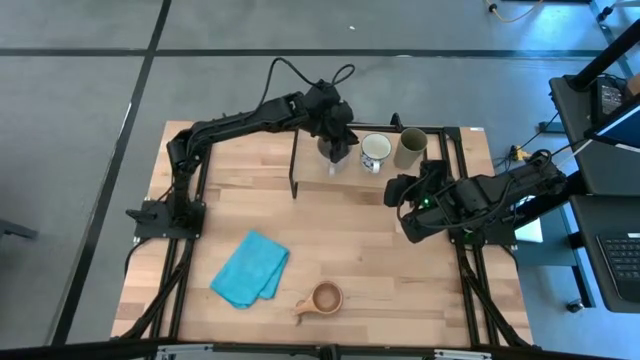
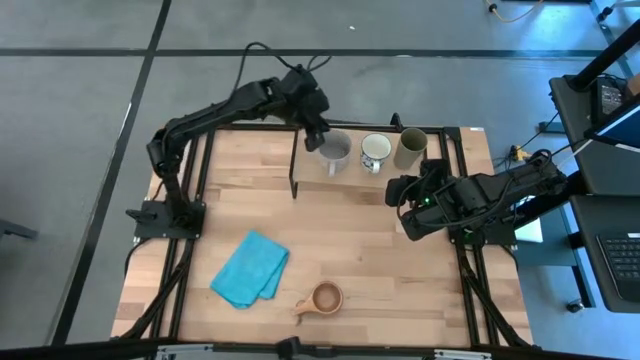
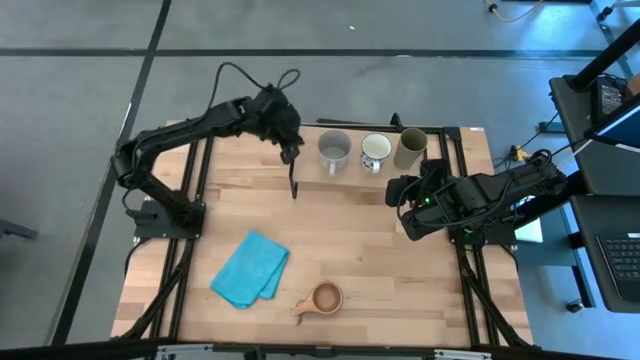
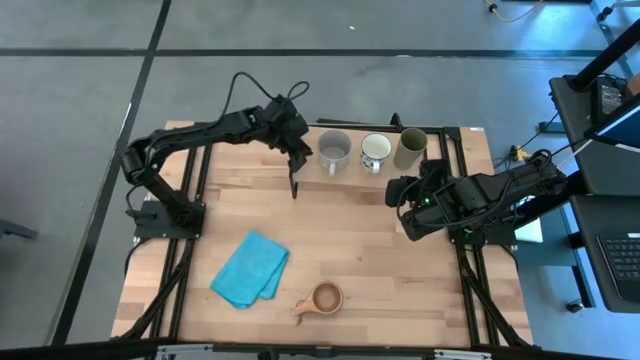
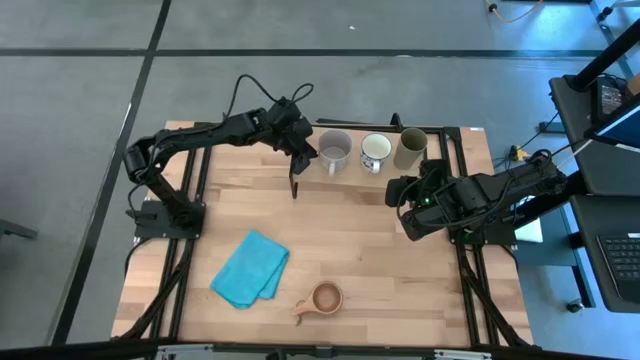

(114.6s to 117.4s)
Task: Stack small to large cups/mugs on shelf
Adjust the gray mug on the shelf

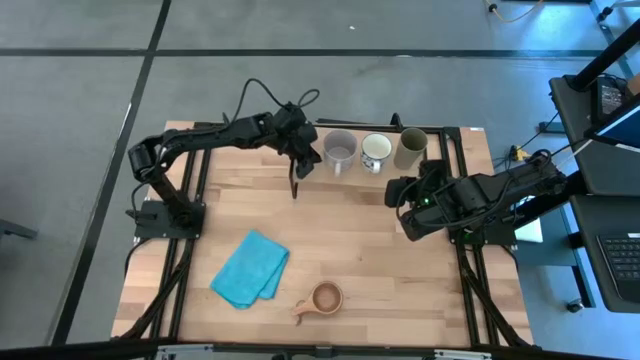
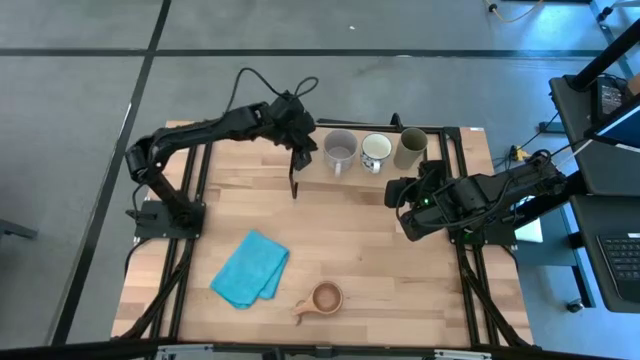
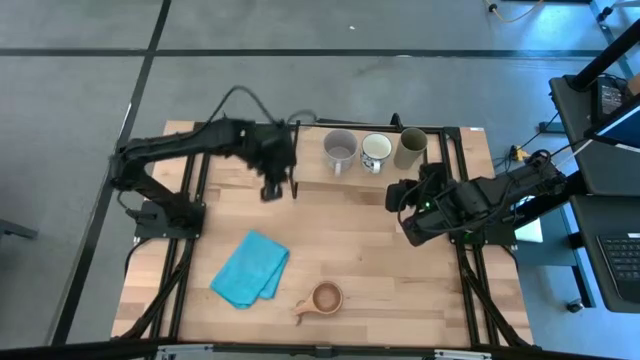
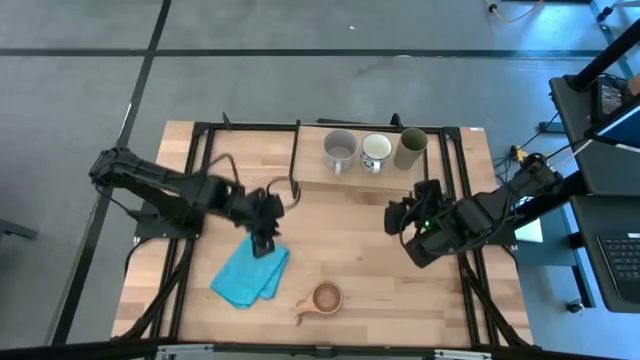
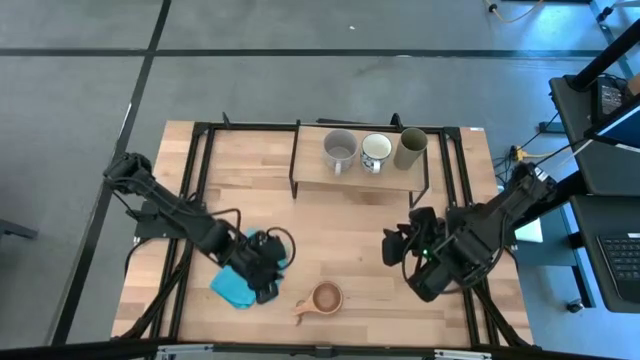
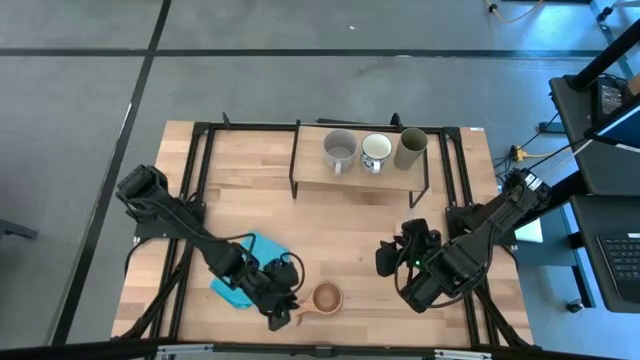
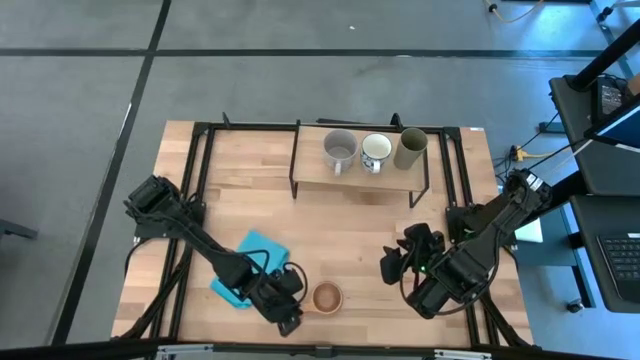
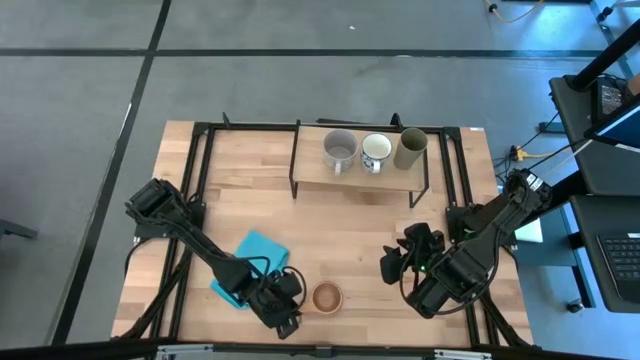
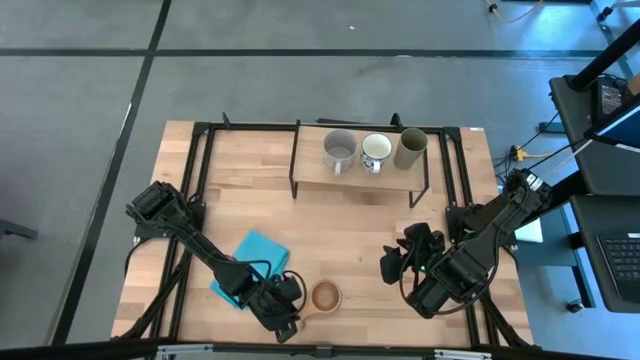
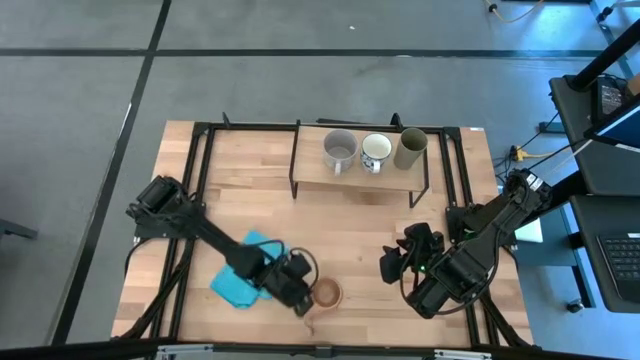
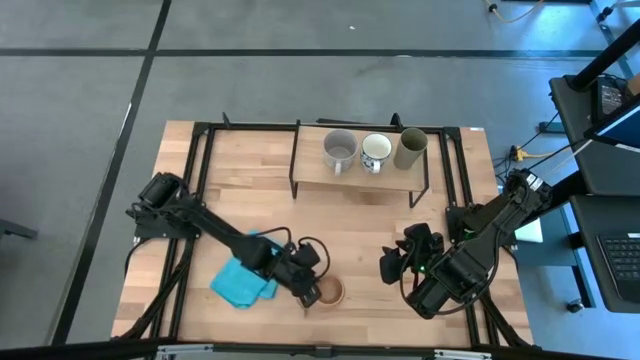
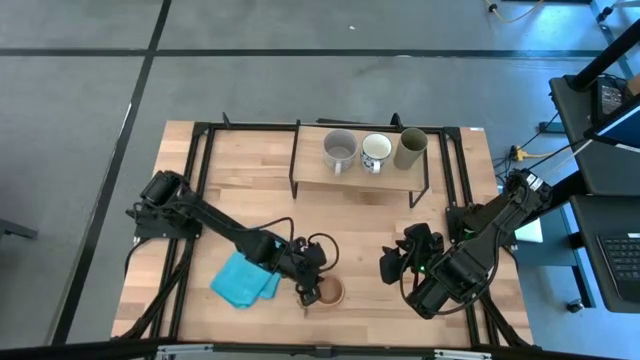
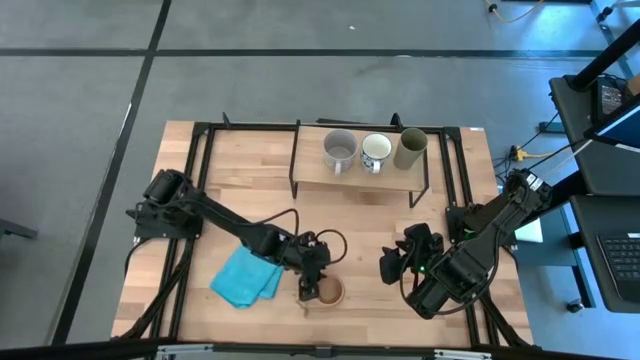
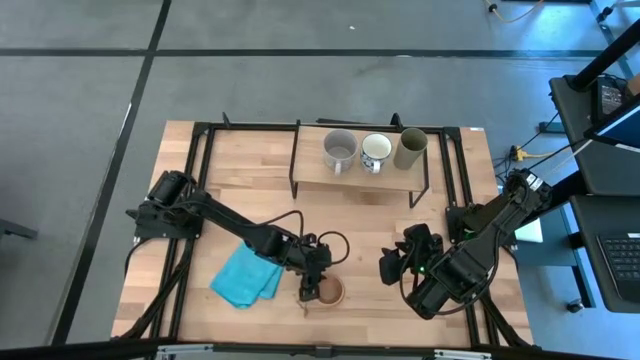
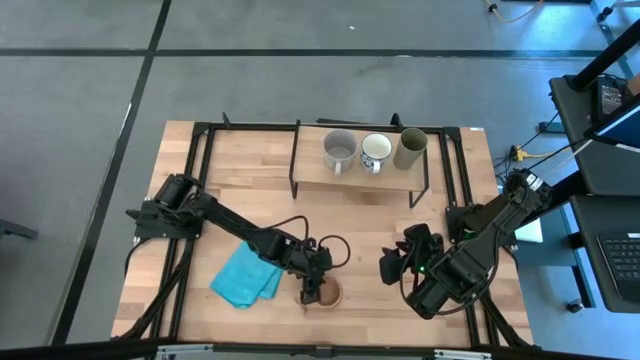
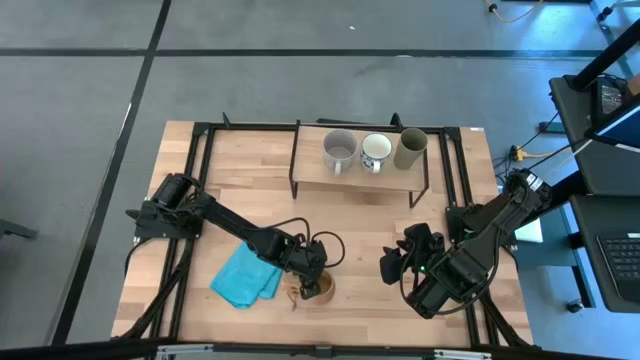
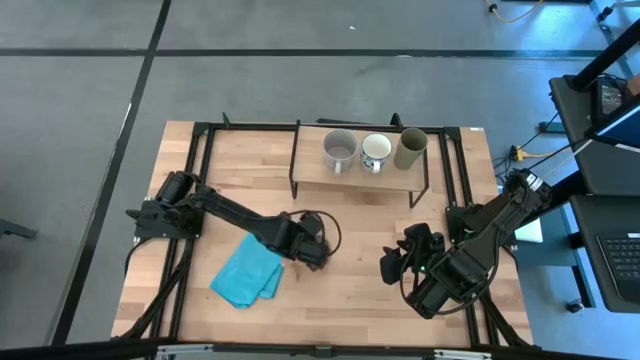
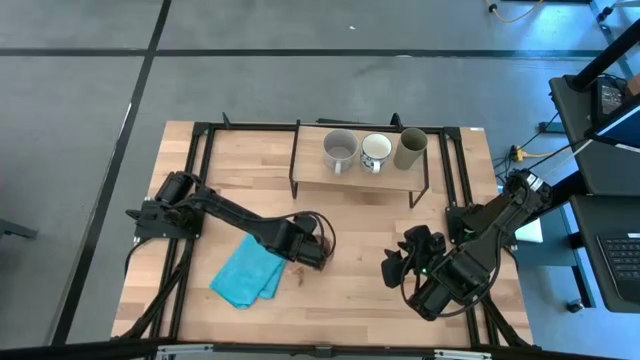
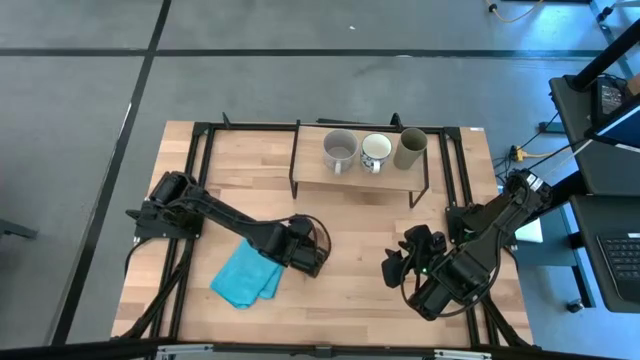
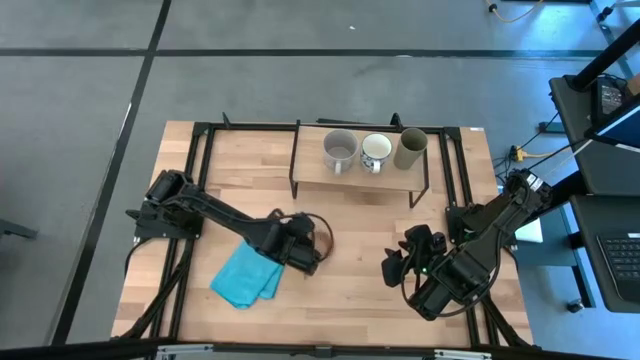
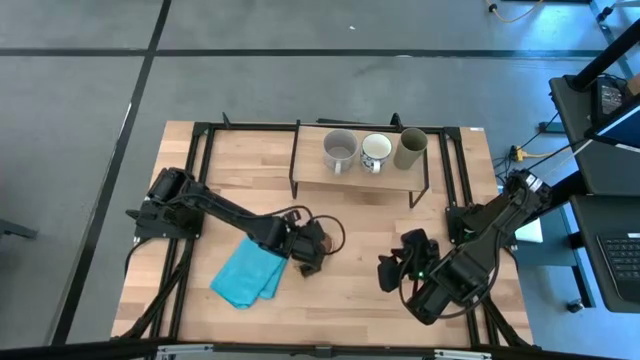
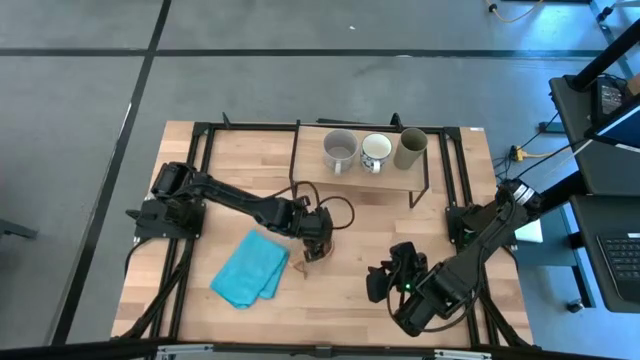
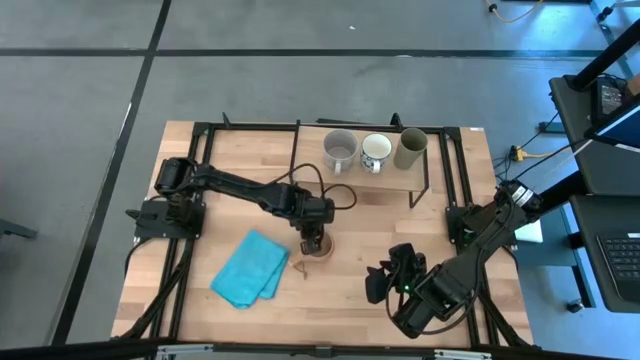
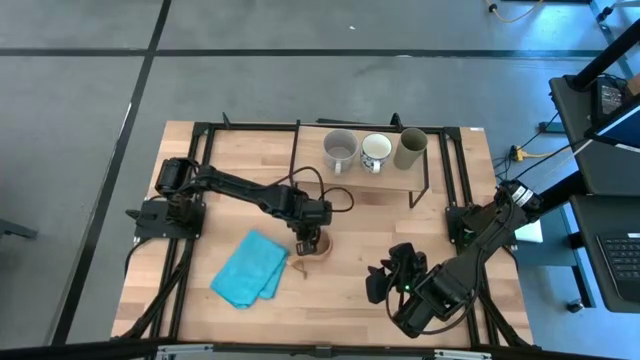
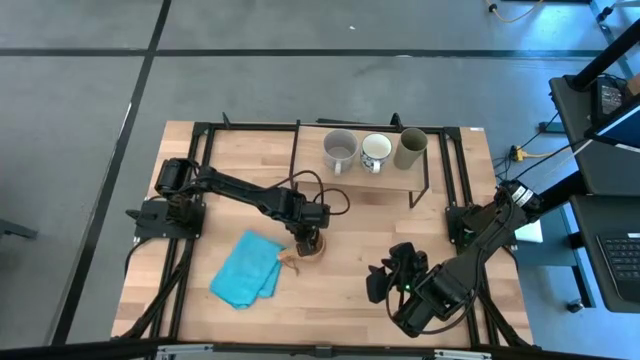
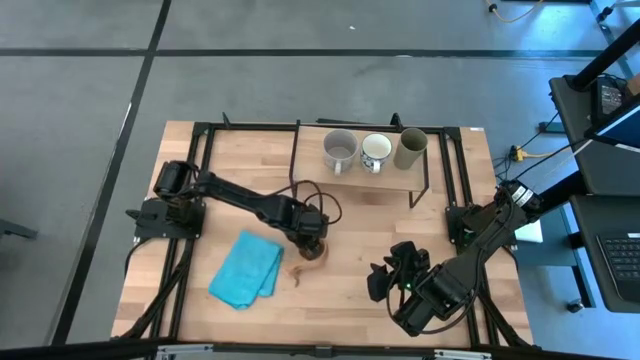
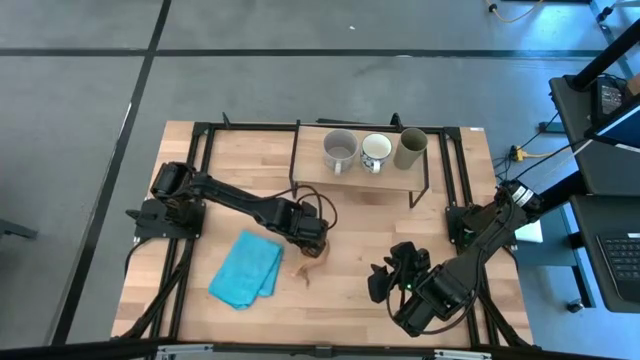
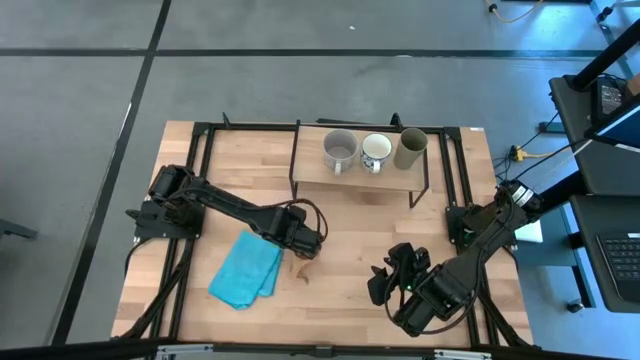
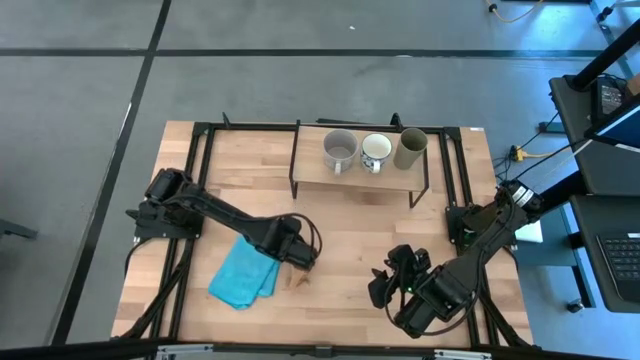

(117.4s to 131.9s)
Put the brown mug on the shelf

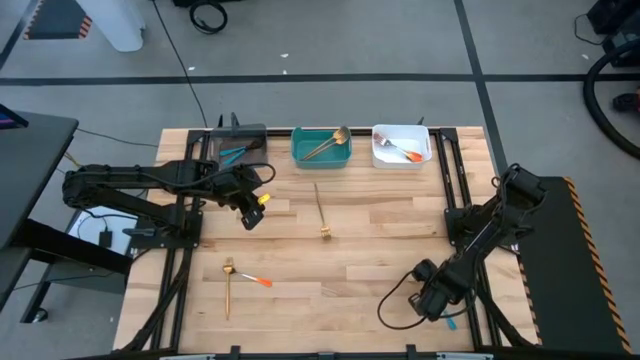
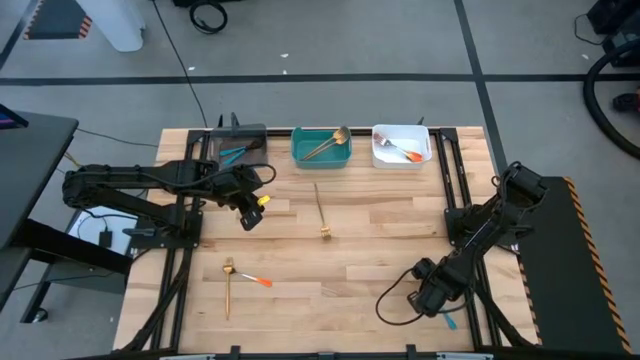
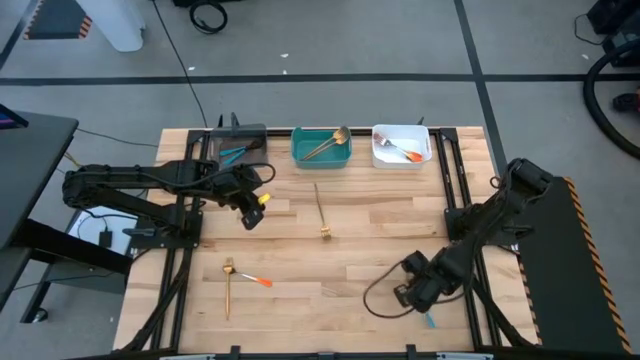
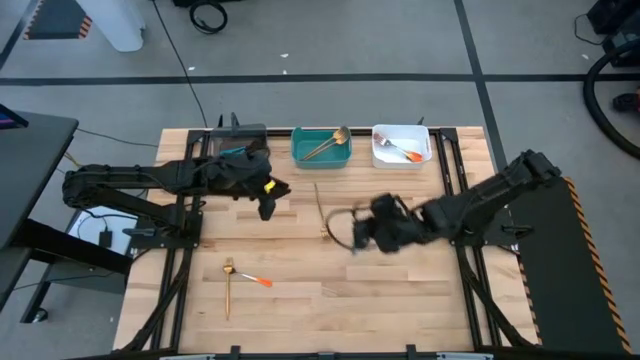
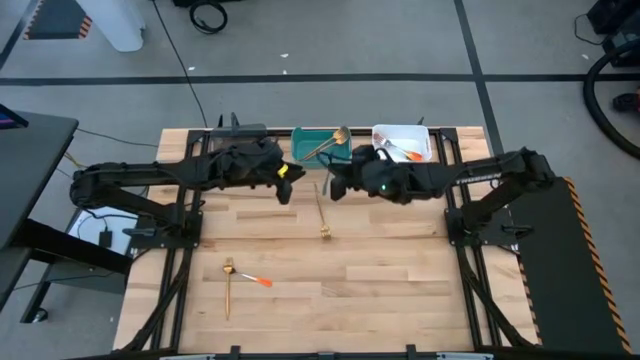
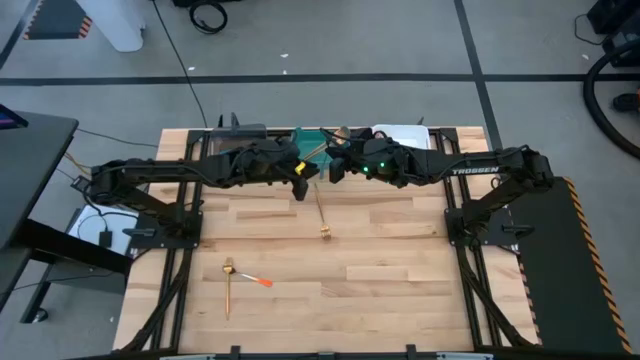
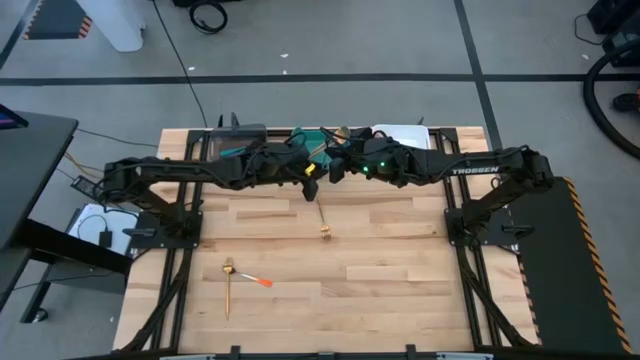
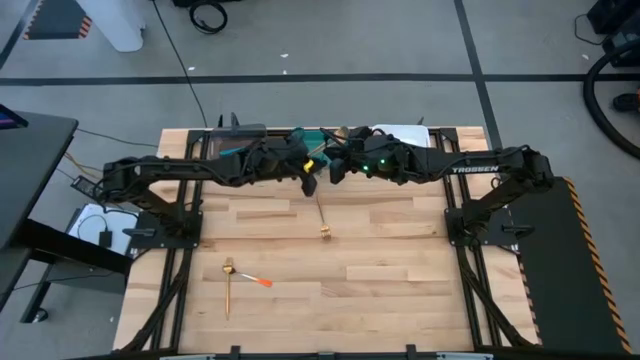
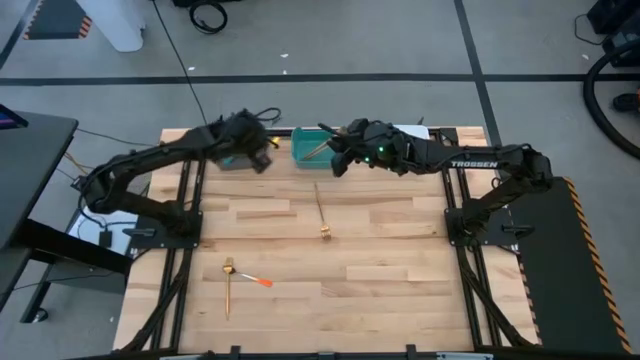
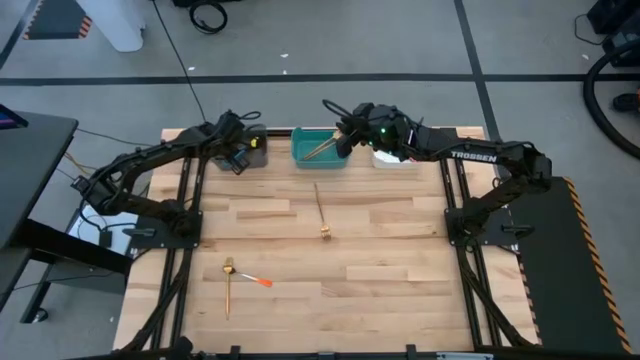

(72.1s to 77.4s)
Task: Sort silverware by color (type)
Put the blue fork into the black bin
